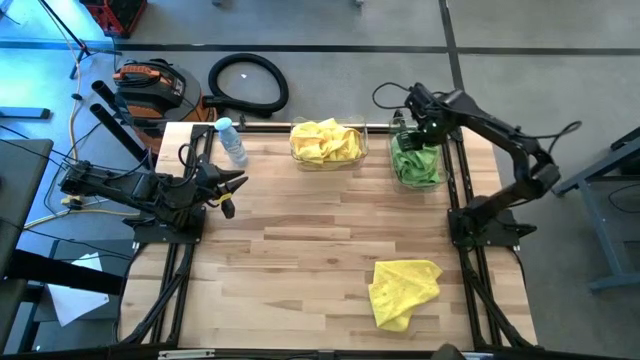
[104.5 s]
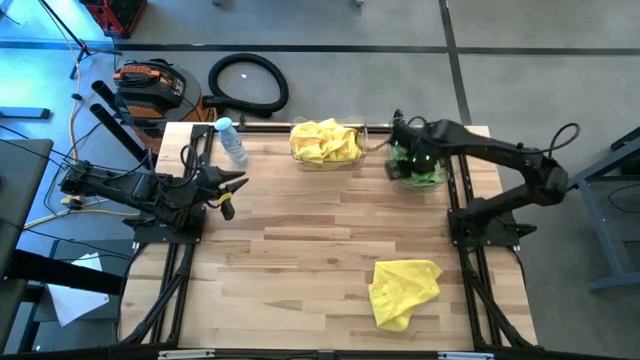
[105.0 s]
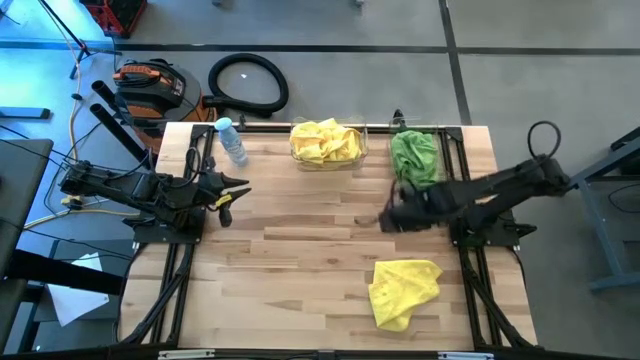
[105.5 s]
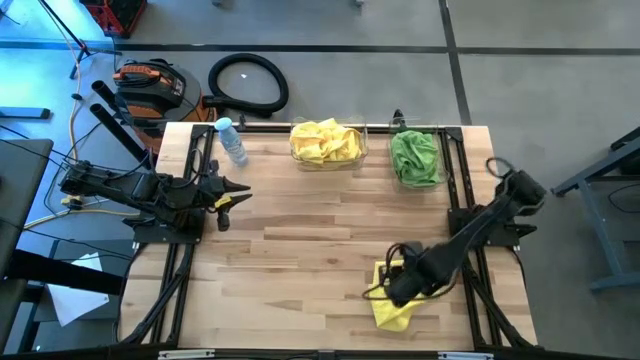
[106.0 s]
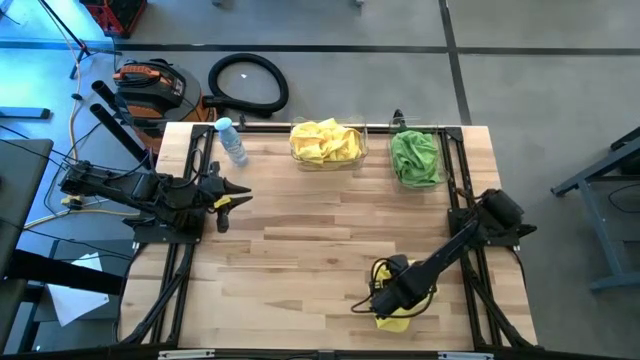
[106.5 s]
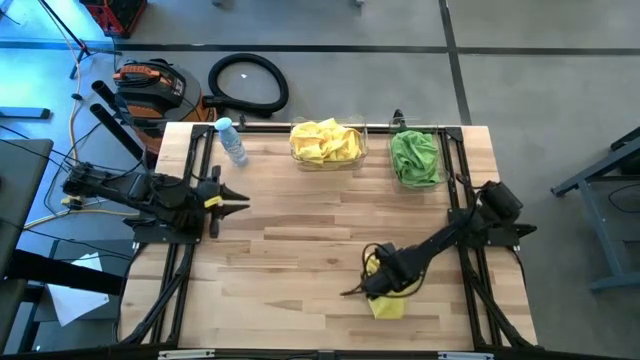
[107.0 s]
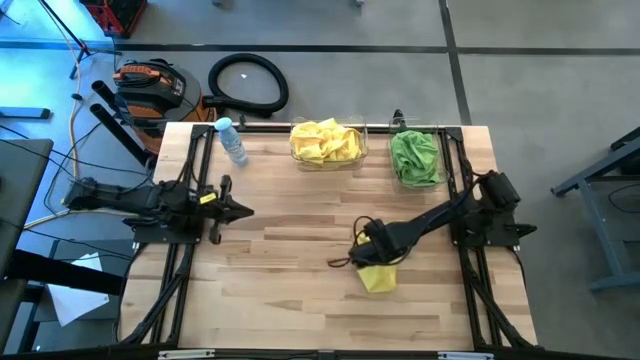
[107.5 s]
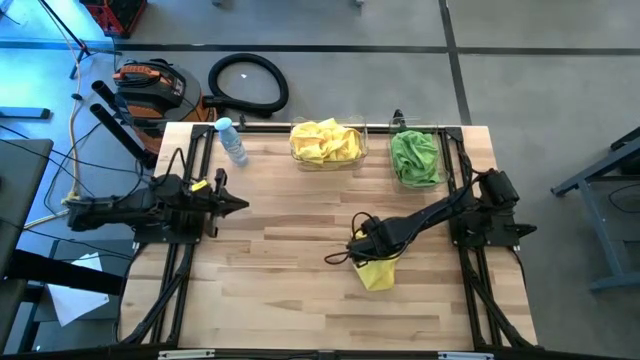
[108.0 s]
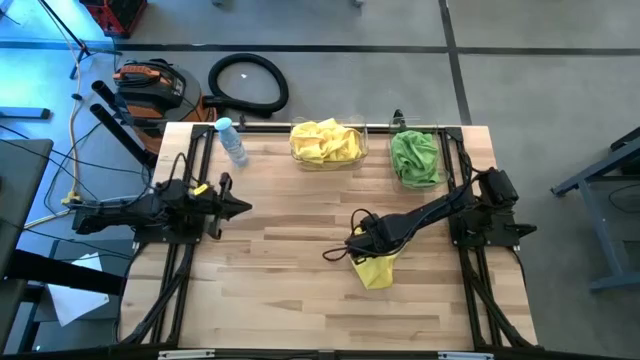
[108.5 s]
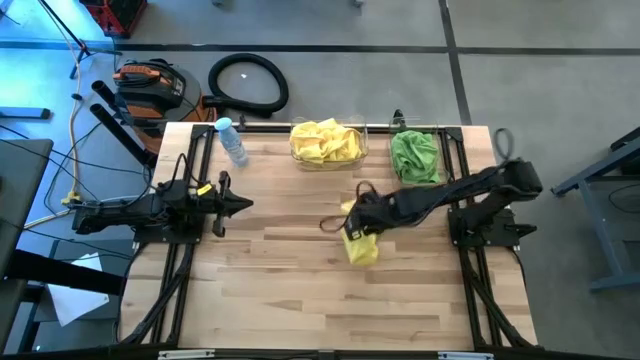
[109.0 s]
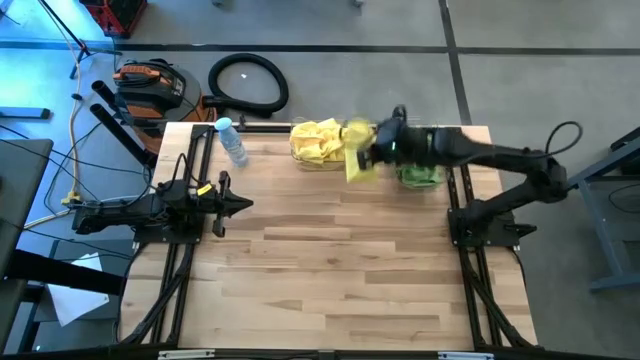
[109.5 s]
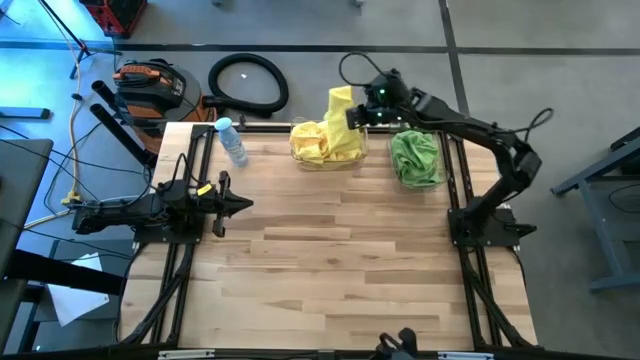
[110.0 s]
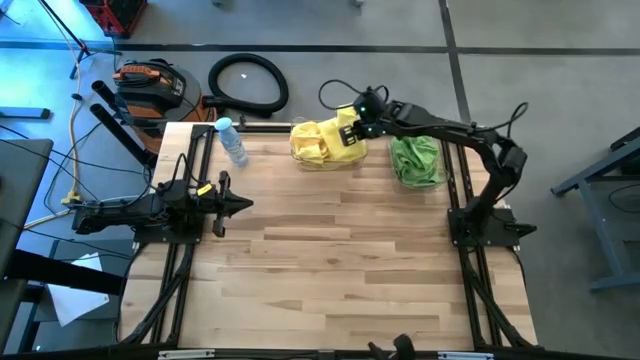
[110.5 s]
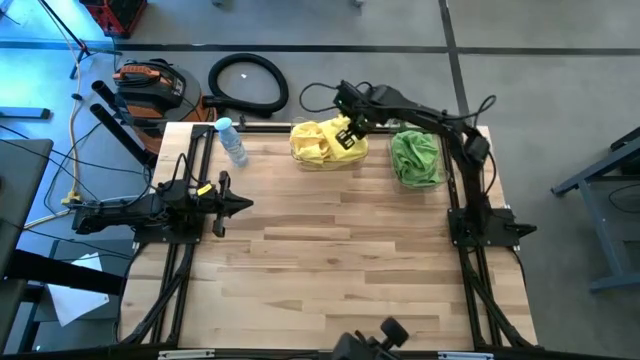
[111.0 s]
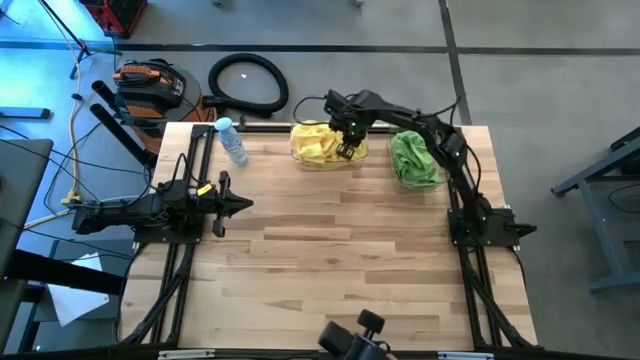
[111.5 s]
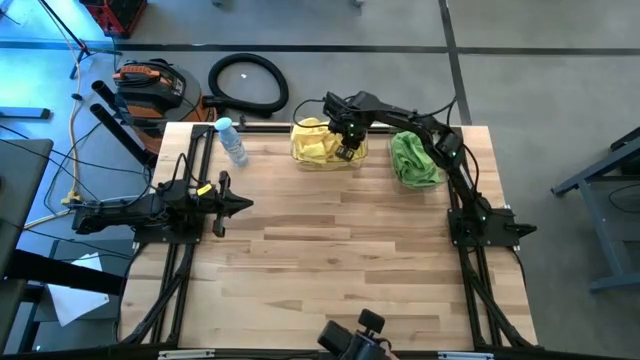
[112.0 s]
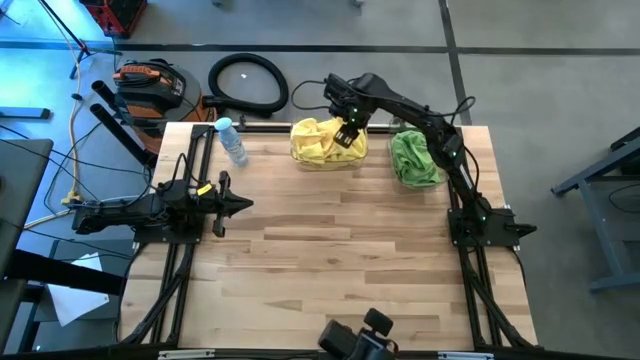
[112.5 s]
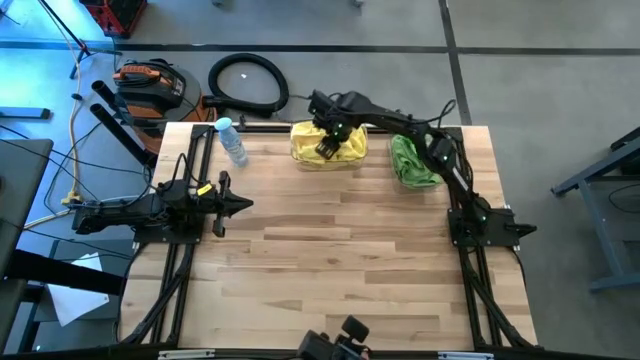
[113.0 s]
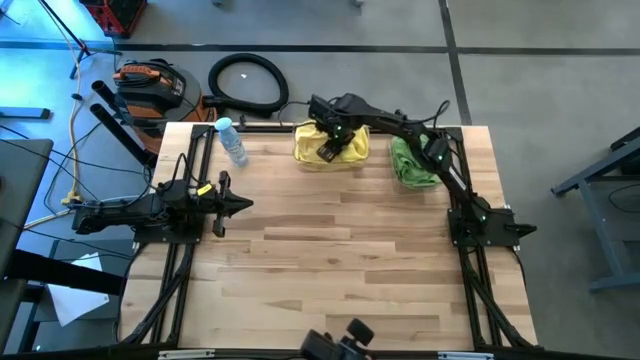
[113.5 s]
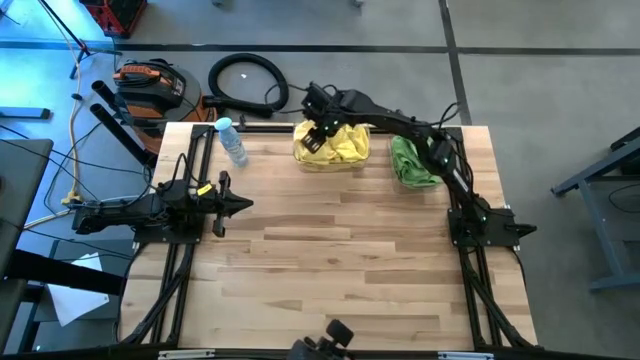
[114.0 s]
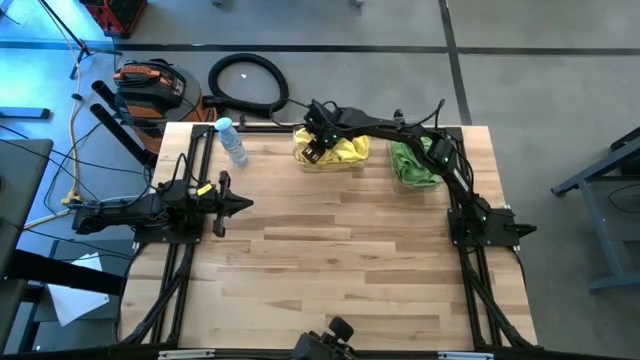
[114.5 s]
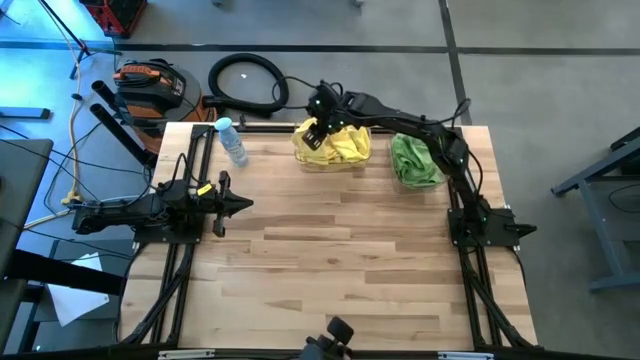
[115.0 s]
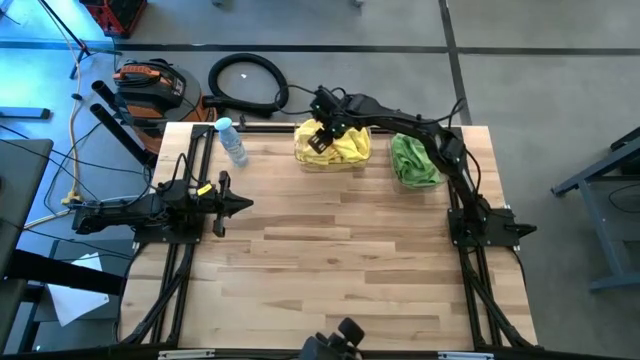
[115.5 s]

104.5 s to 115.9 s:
Task: Sort microfiber towel by color & place in baskets
Put the yellow microfiber cloth into the left transparent bin

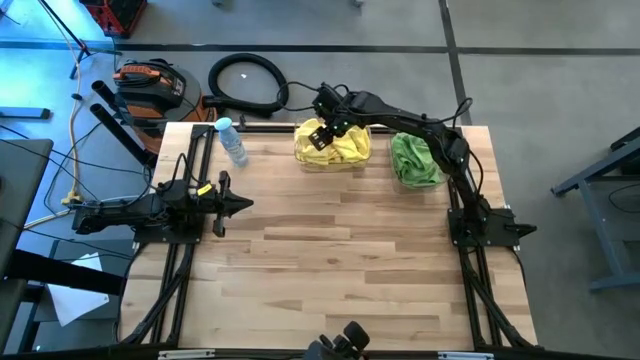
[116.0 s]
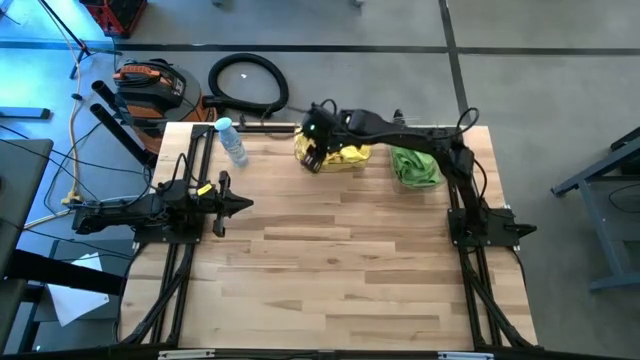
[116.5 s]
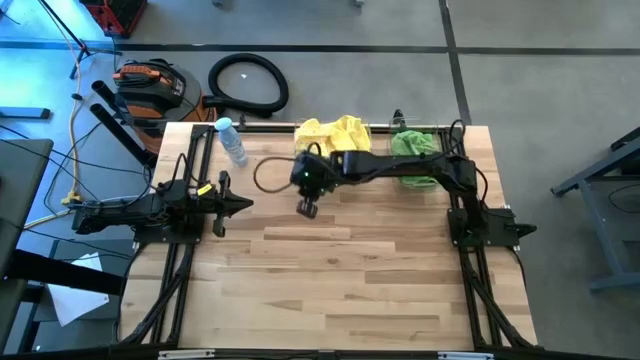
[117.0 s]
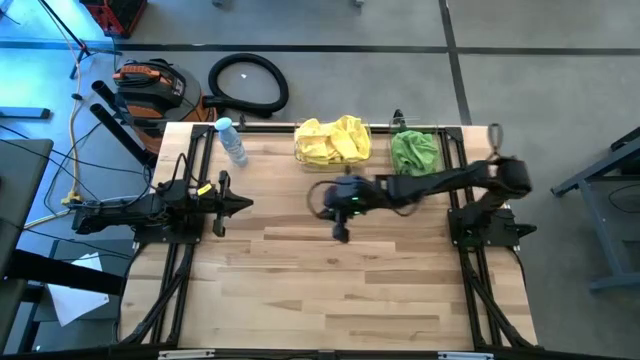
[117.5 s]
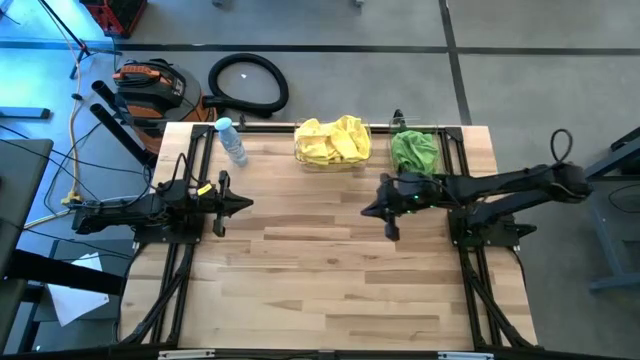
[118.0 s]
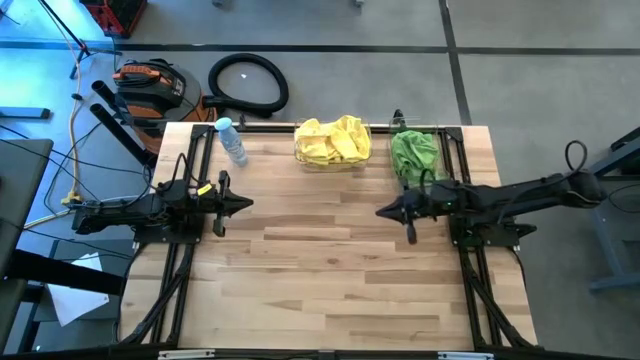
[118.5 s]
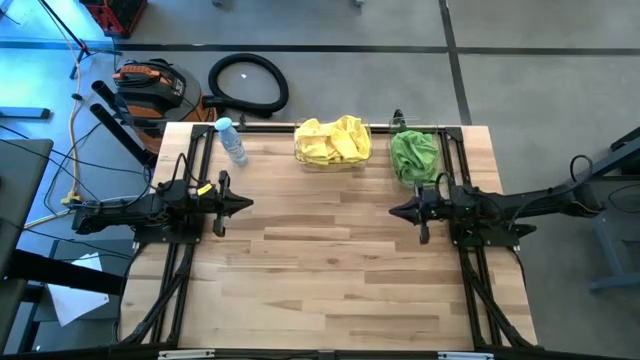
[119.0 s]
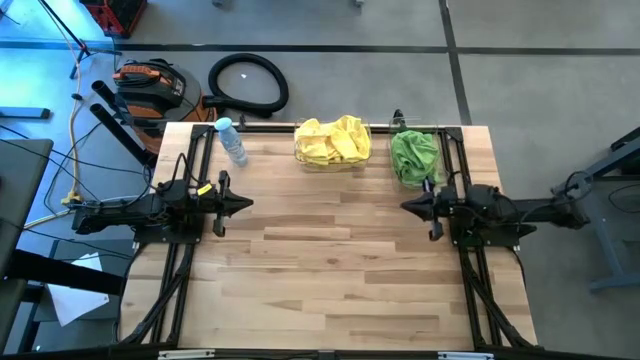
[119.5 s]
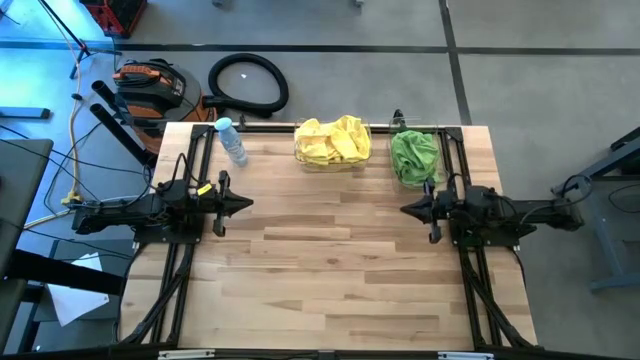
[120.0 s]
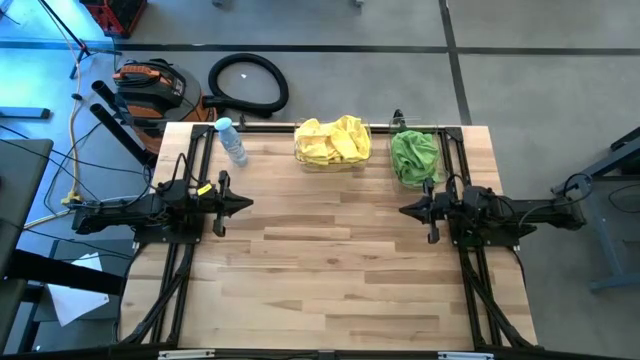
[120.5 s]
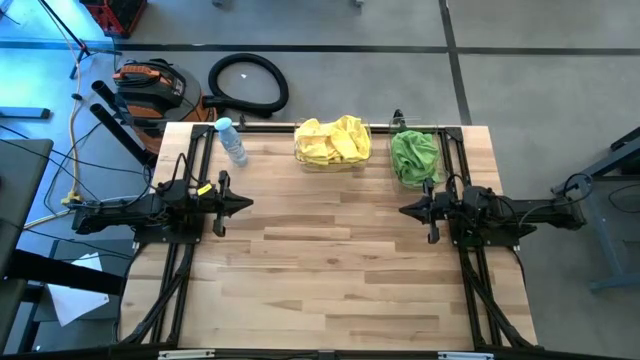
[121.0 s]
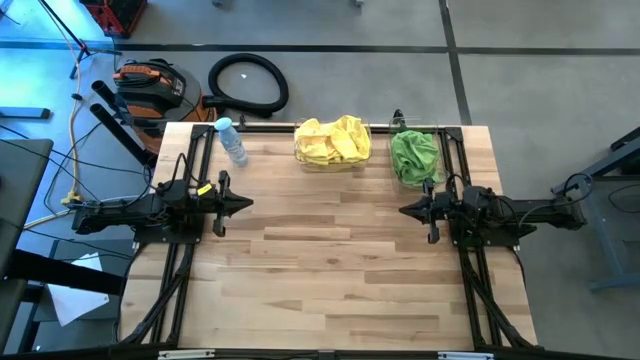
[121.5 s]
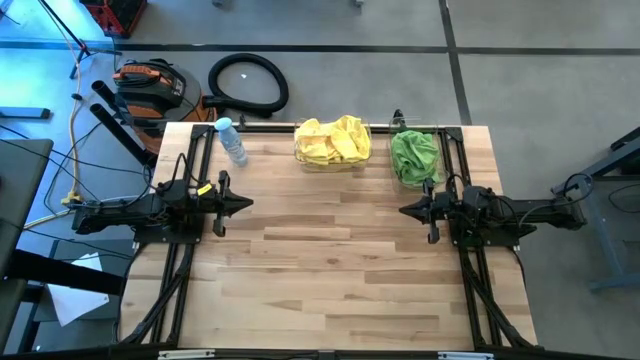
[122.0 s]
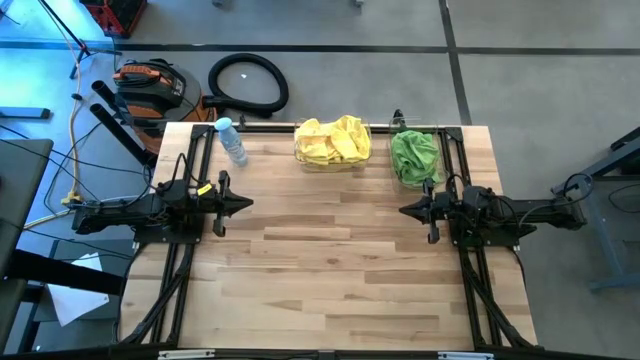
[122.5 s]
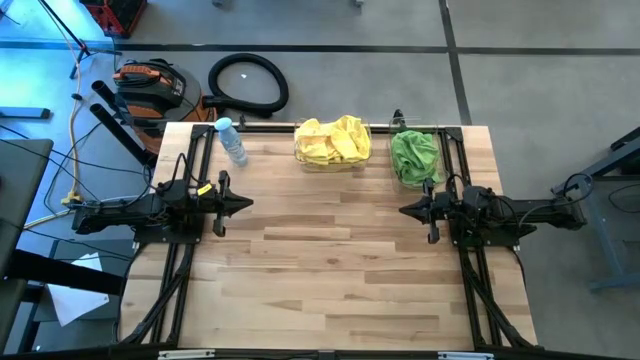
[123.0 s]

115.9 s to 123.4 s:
Return to Home Position

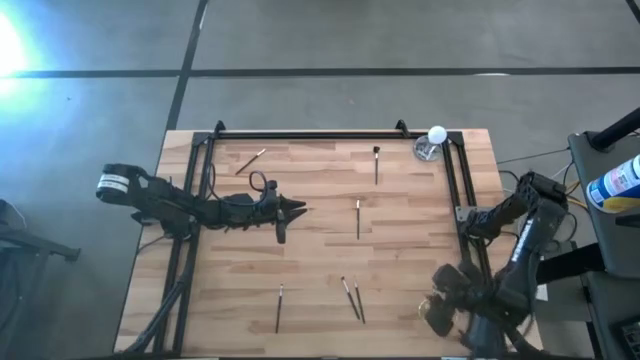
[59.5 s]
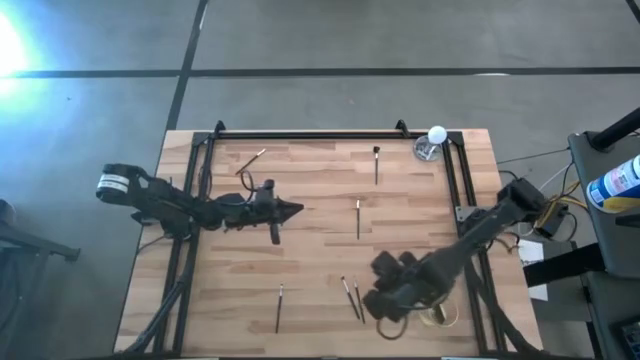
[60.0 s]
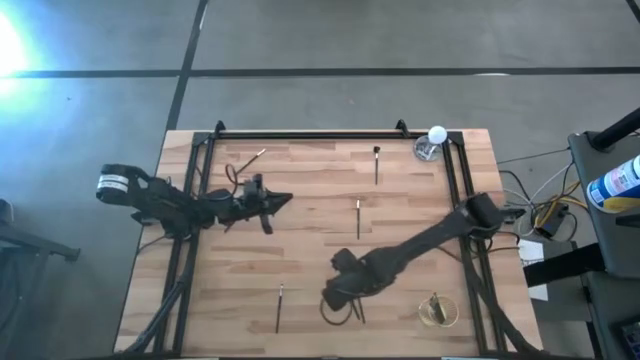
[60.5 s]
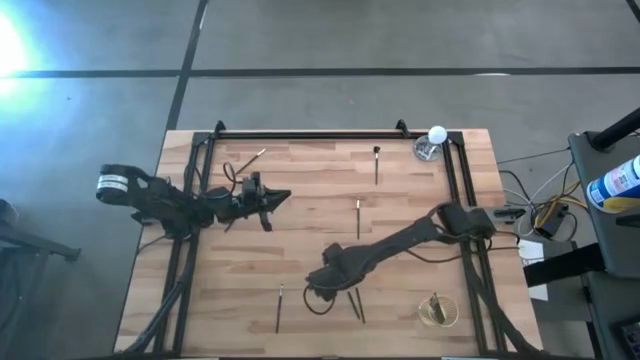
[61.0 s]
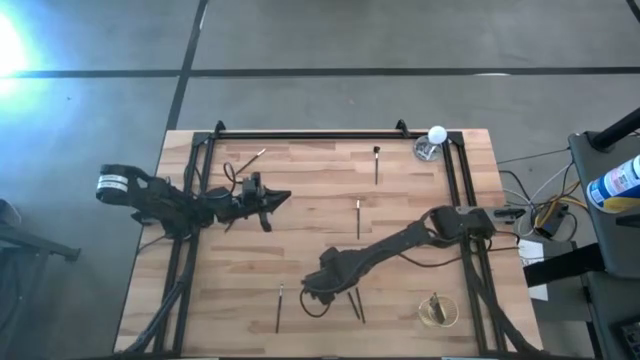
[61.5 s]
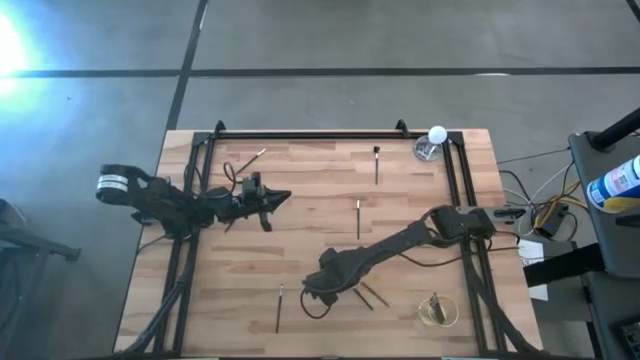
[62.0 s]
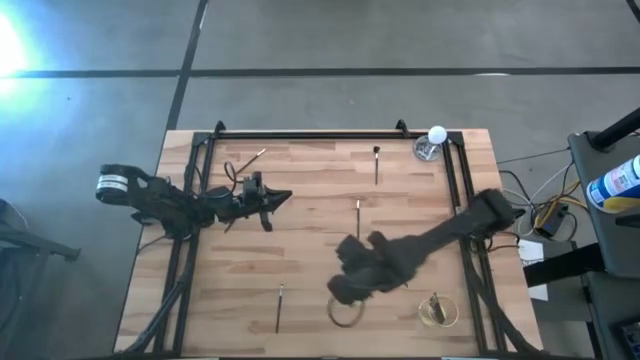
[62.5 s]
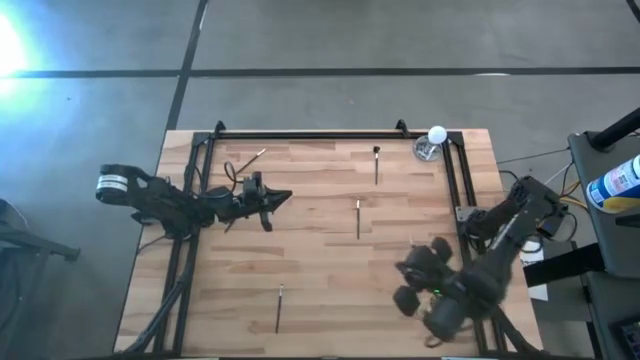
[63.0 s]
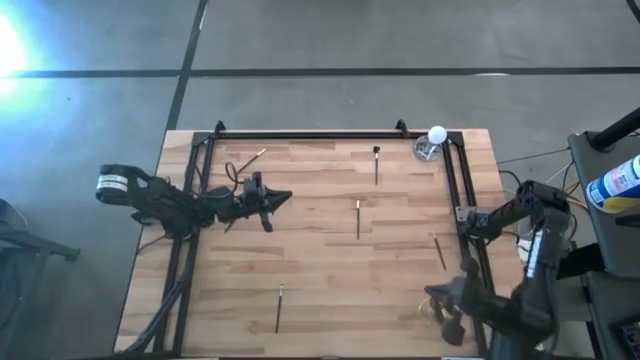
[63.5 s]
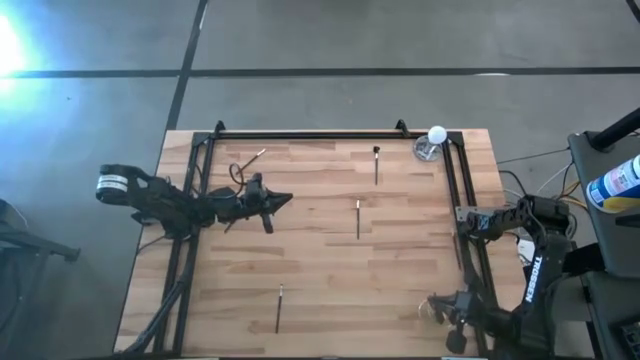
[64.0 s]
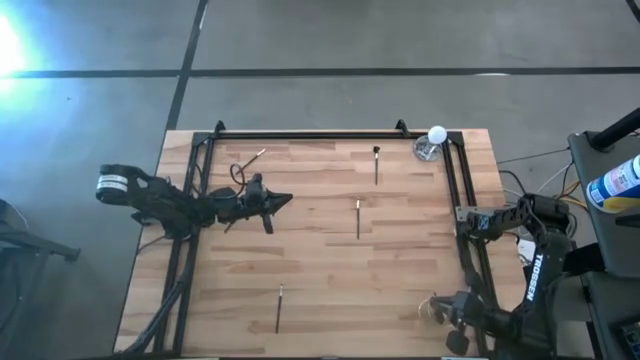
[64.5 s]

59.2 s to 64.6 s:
Task: Pick & Place Makeup Brushes
Put the eyeshadow brush into the makeup brush holder
